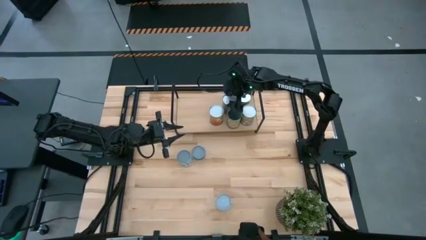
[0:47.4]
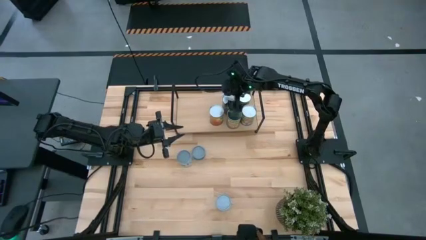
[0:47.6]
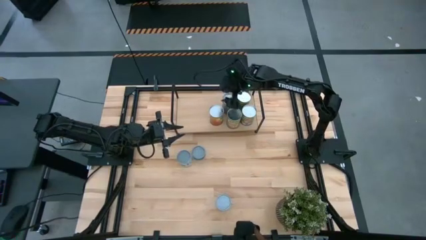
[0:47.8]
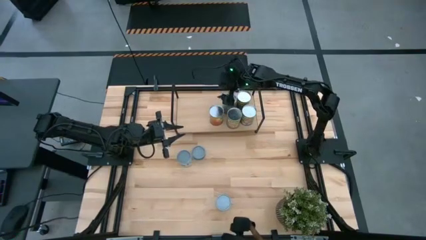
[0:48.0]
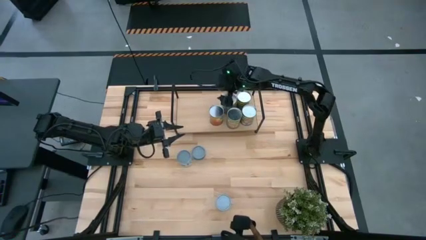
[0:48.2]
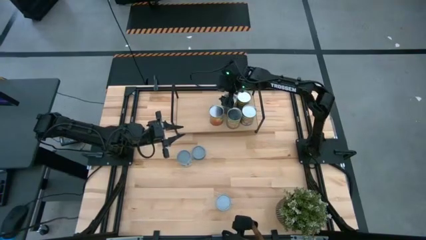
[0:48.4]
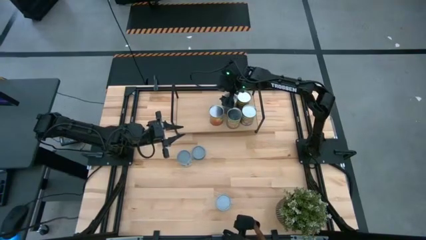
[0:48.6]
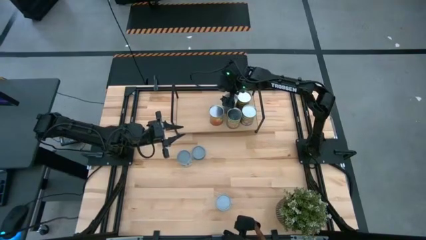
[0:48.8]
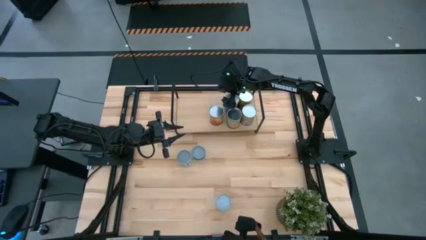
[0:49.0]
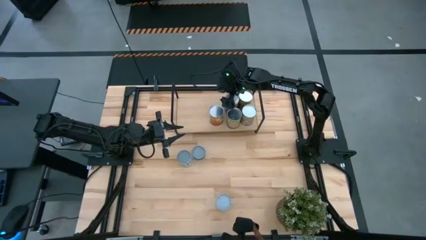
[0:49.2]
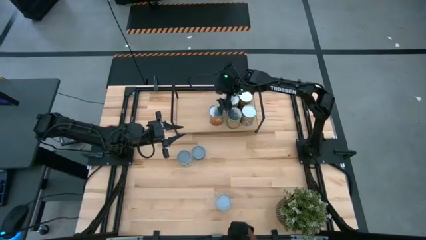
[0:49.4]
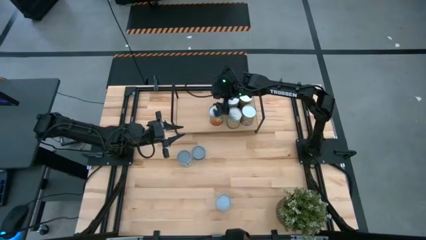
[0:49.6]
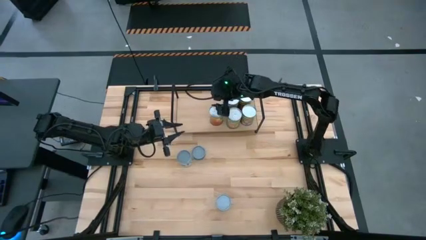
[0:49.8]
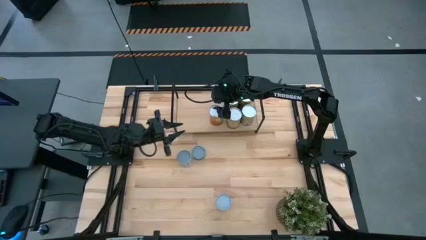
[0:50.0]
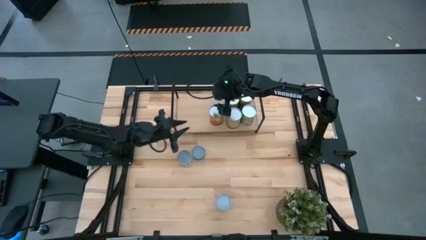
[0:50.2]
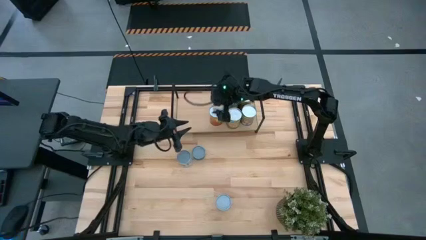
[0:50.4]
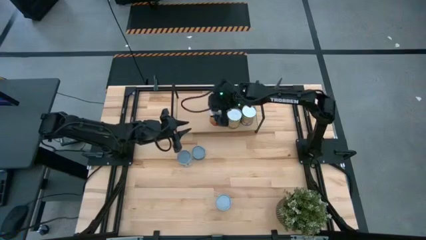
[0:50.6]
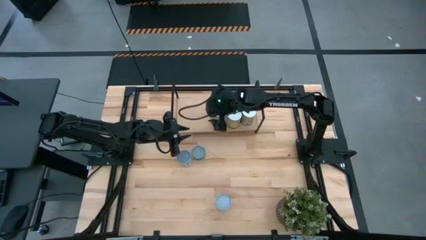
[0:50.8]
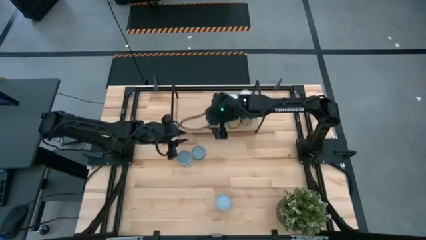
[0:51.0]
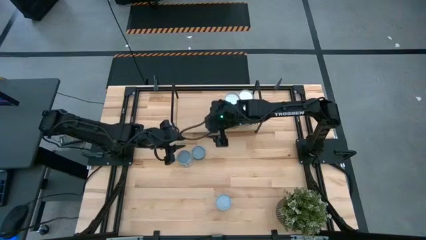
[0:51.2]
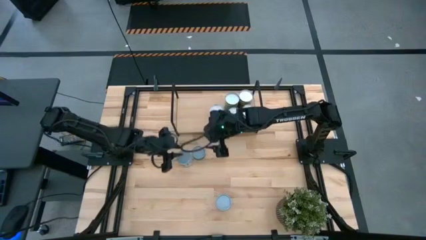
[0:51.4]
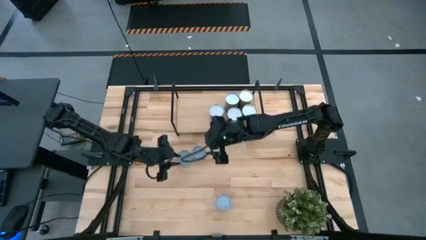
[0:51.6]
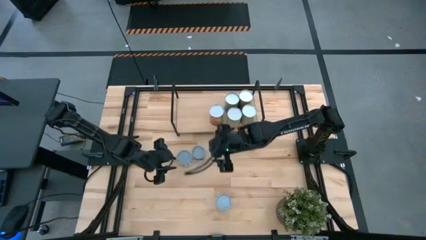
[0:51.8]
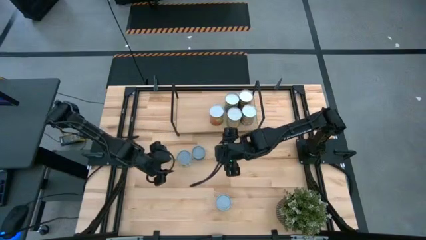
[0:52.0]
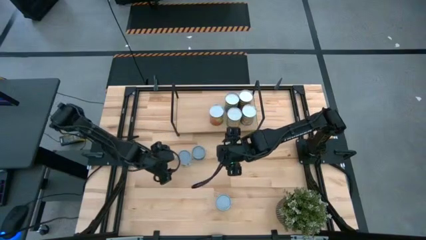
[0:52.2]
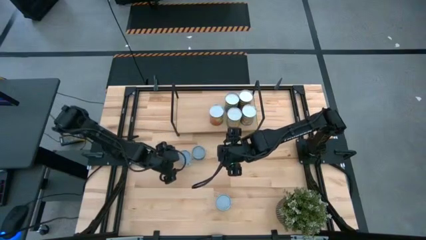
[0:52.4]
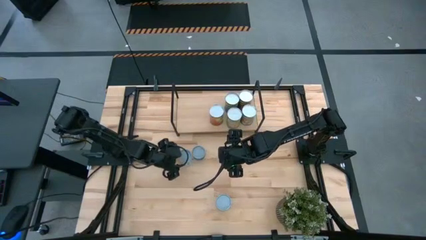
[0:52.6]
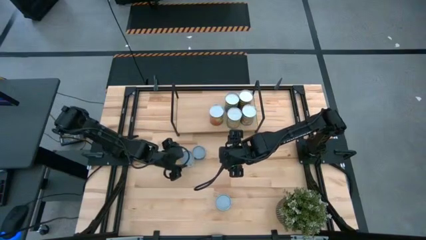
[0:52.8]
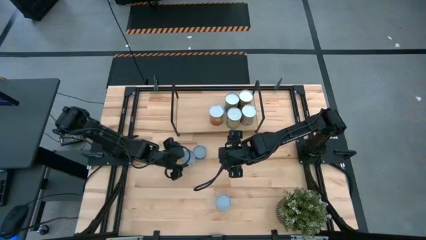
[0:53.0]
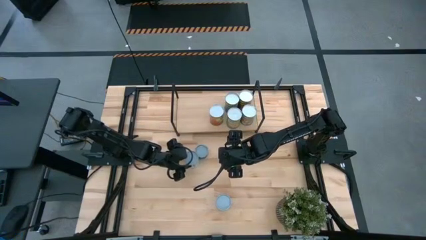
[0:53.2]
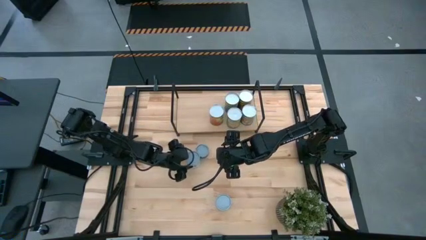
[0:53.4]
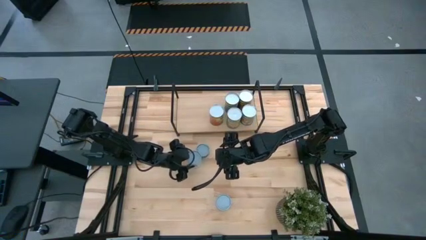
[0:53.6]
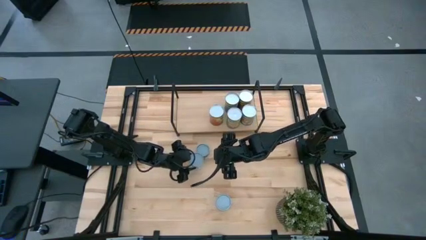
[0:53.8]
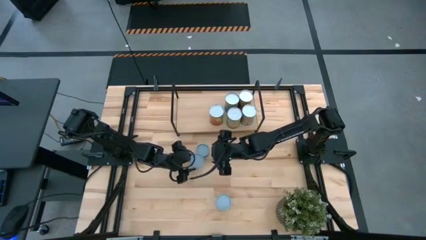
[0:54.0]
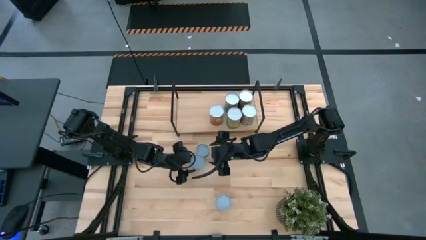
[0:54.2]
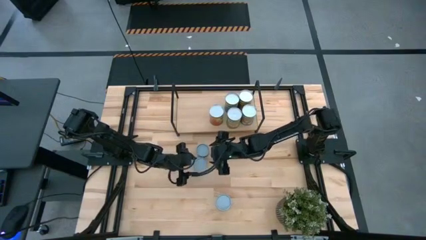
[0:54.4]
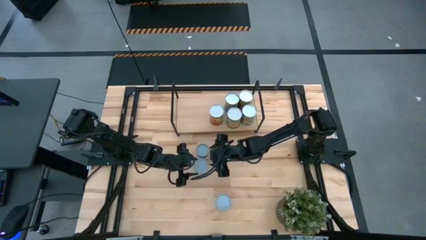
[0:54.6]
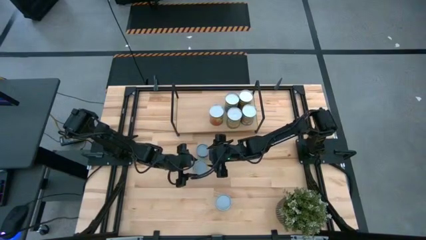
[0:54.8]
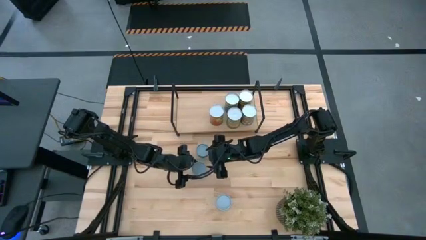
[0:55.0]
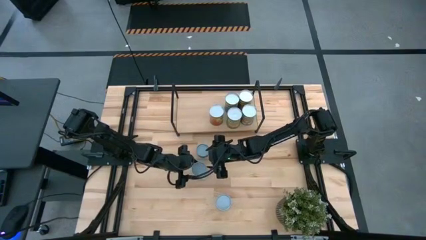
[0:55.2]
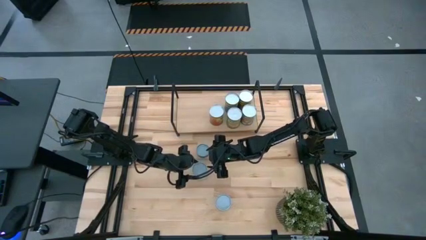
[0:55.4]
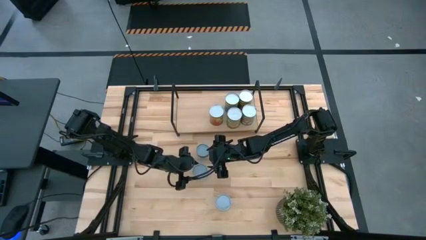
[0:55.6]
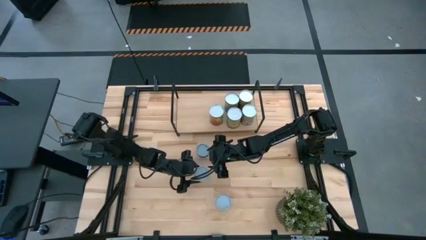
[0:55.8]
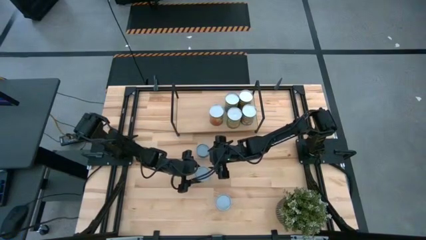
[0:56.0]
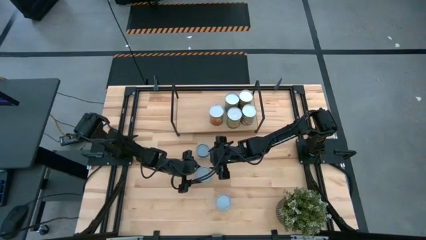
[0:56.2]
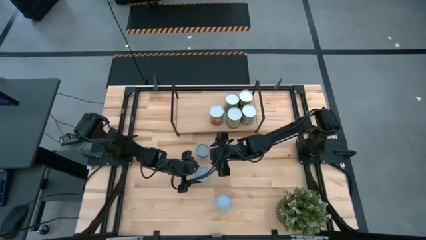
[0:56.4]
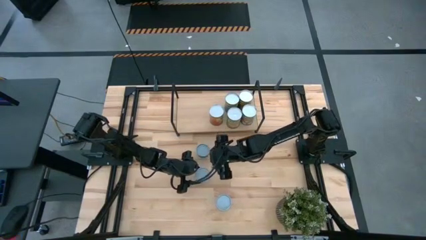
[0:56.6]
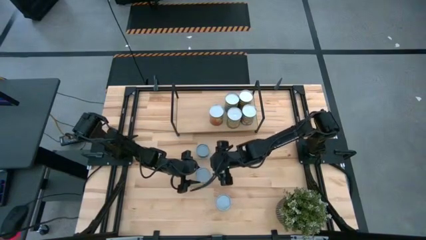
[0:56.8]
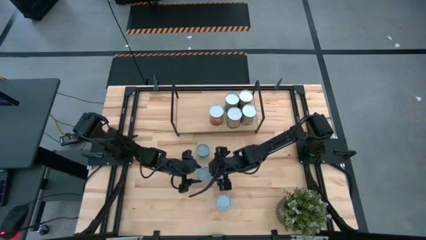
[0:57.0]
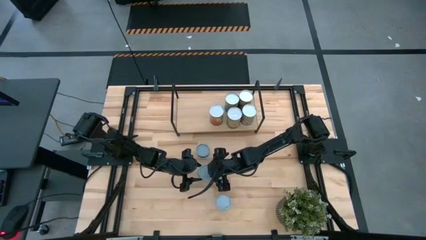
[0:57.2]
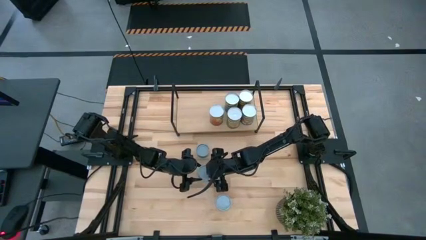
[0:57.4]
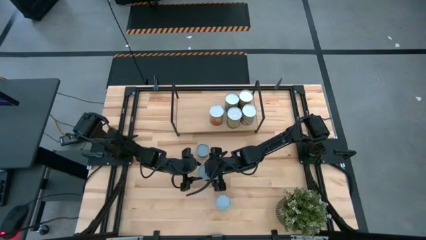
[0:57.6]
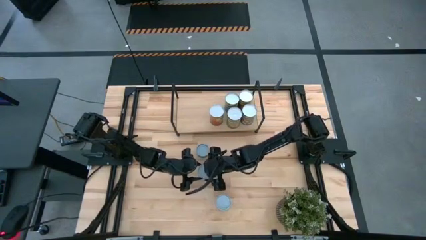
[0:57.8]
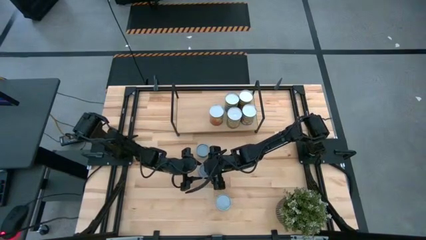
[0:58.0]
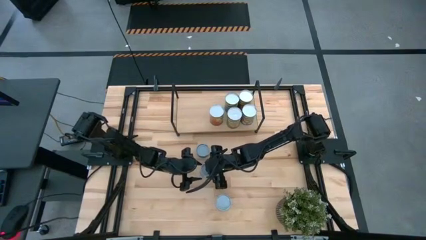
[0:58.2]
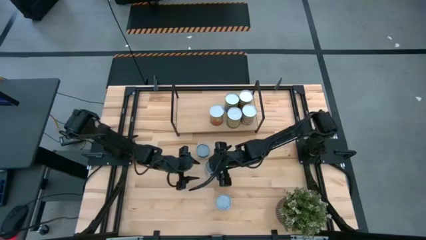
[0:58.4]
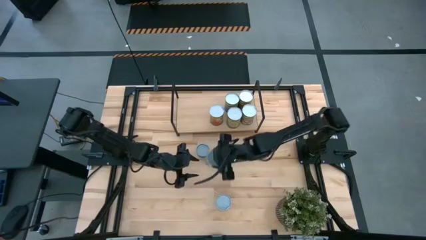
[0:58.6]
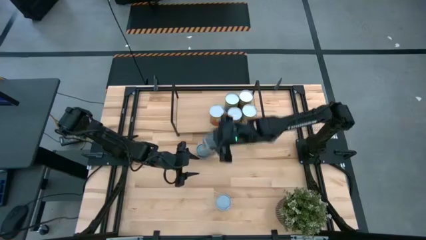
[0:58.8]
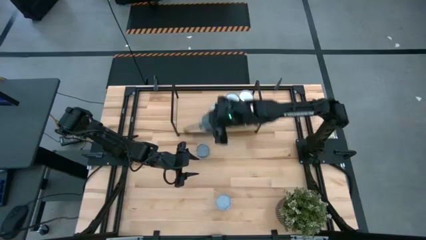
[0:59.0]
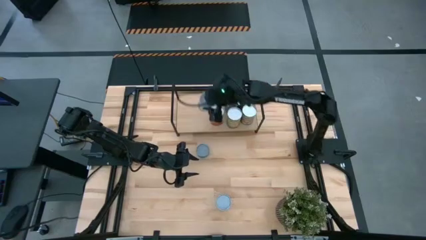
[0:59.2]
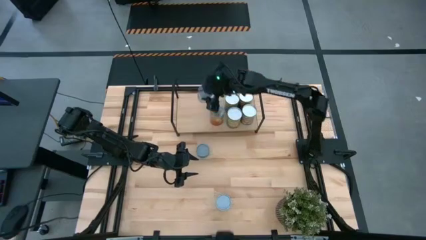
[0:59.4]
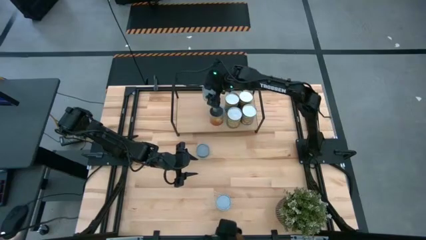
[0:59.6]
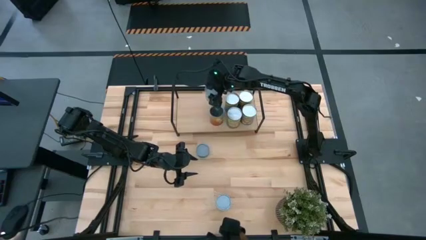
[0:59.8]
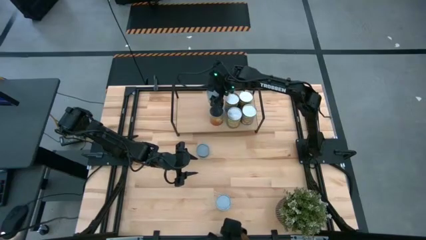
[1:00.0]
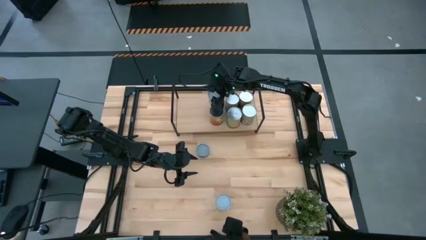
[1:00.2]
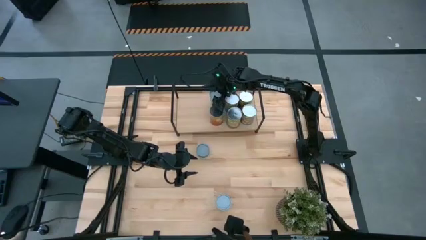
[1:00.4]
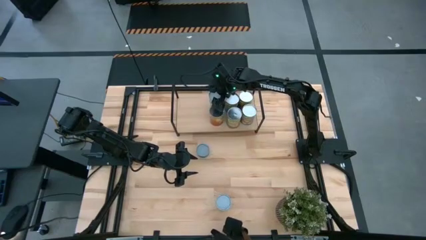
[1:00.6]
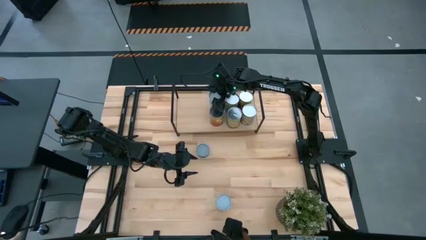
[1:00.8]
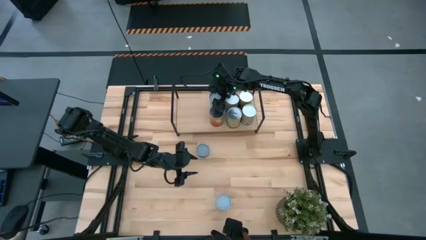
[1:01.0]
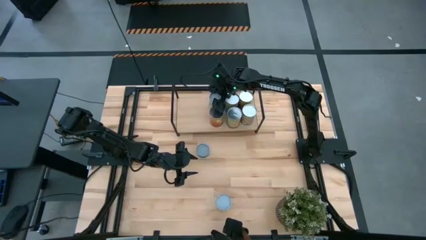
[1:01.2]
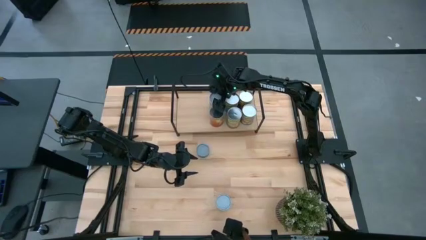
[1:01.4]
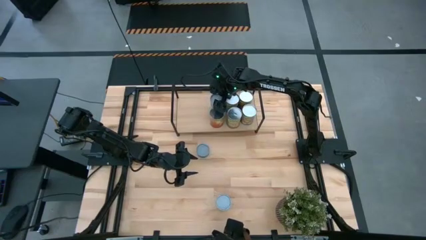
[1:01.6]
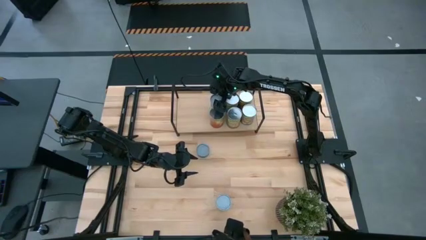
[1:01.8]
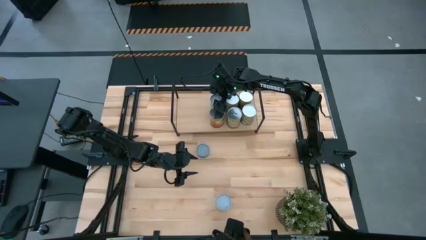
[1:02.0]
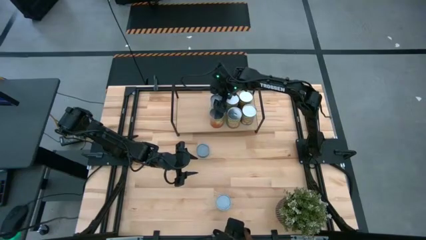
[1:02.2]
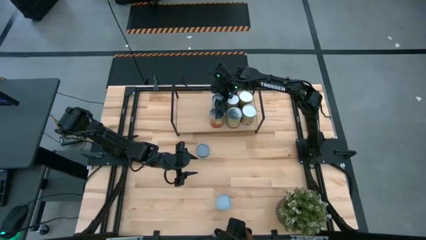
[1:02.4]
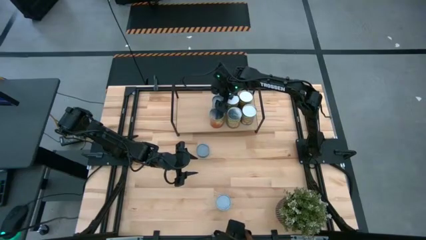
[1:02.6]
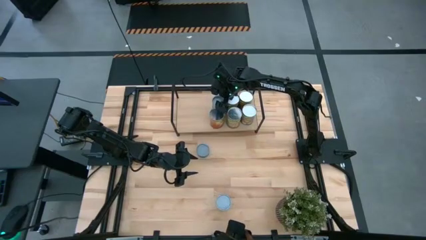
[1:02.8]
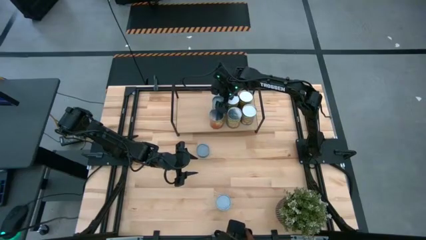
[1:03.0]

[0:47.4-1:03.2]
Task: Pick and place cans onto a shelf
Put the canned mixed vegetables food on the shelf
